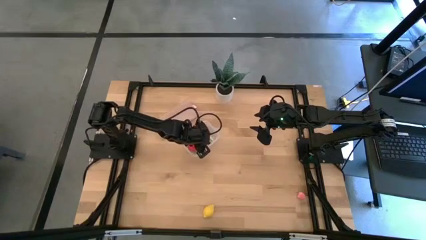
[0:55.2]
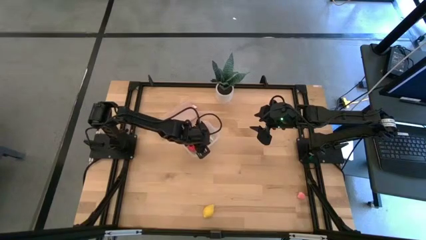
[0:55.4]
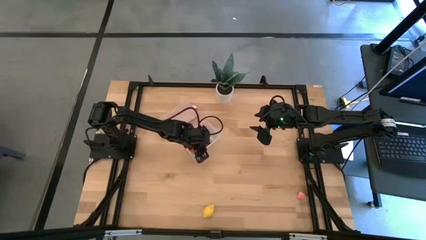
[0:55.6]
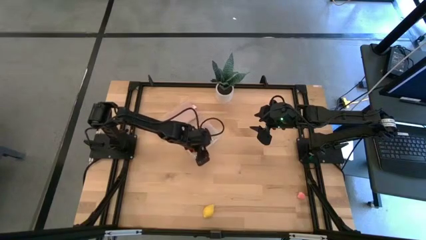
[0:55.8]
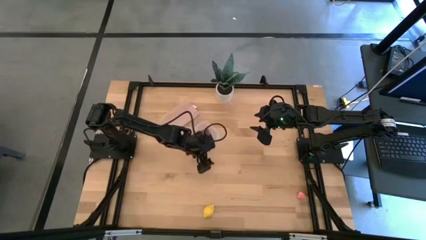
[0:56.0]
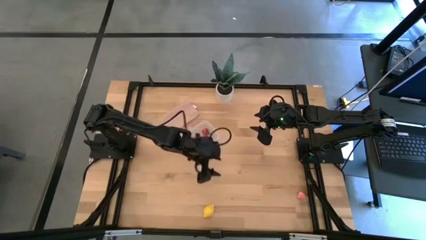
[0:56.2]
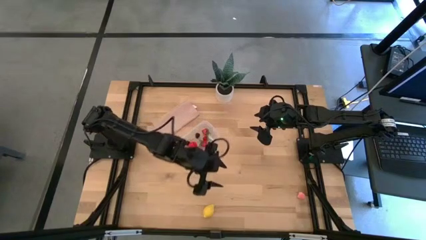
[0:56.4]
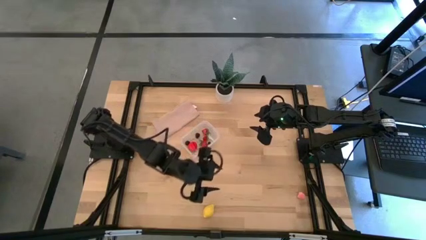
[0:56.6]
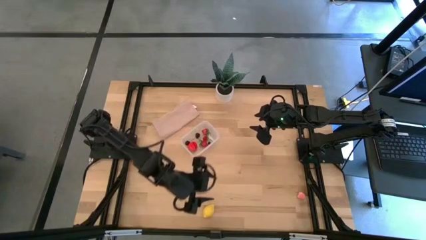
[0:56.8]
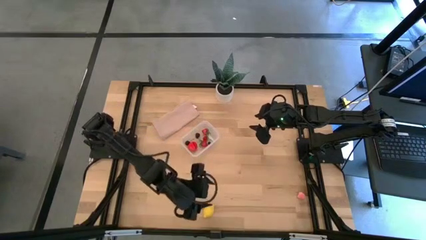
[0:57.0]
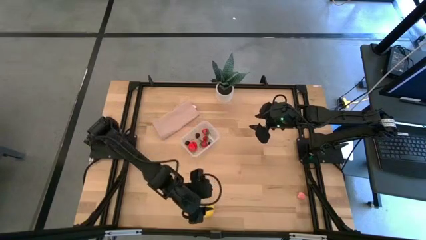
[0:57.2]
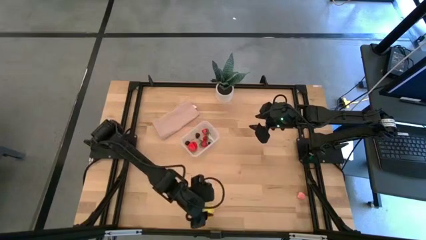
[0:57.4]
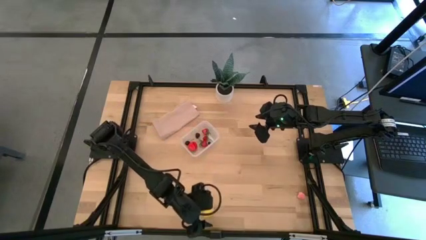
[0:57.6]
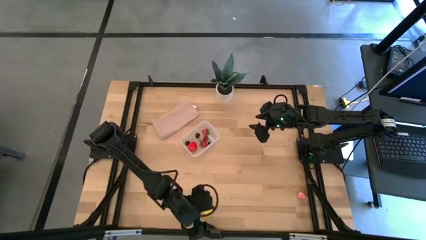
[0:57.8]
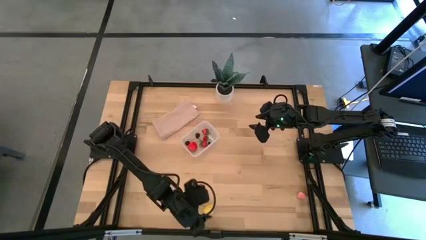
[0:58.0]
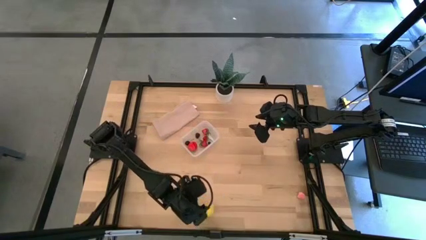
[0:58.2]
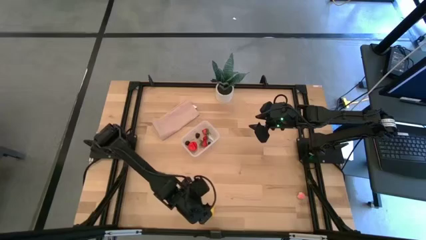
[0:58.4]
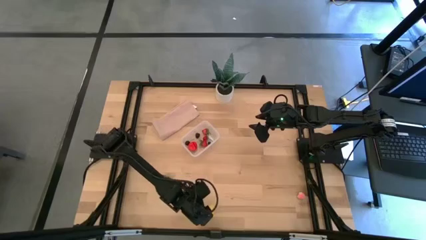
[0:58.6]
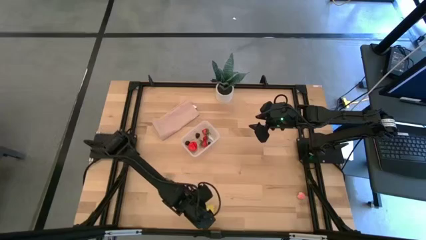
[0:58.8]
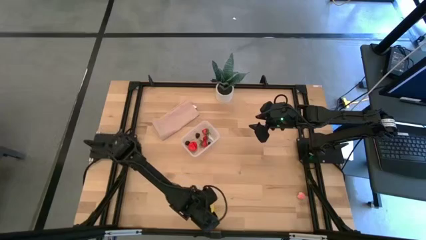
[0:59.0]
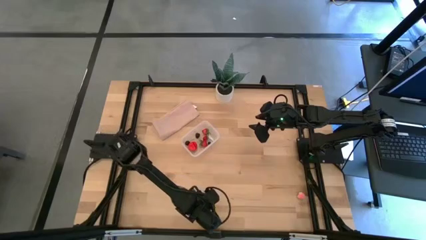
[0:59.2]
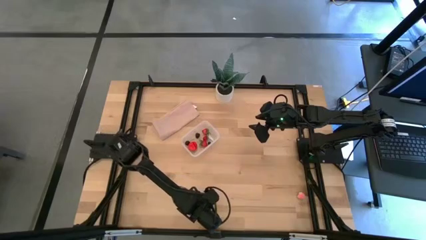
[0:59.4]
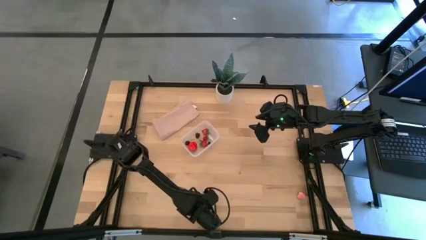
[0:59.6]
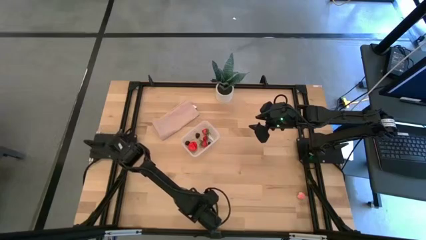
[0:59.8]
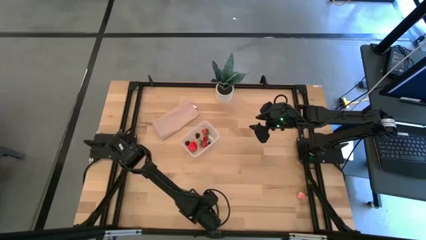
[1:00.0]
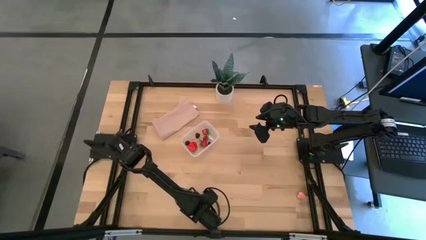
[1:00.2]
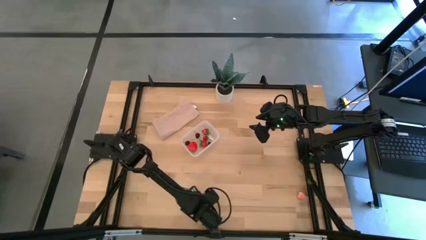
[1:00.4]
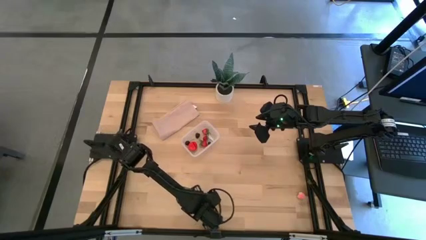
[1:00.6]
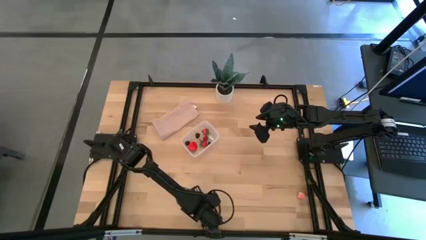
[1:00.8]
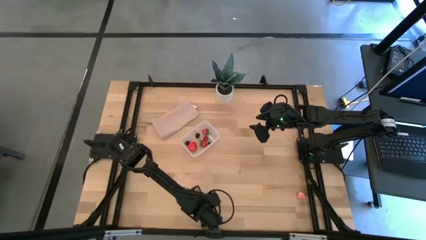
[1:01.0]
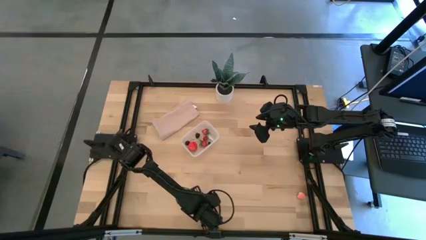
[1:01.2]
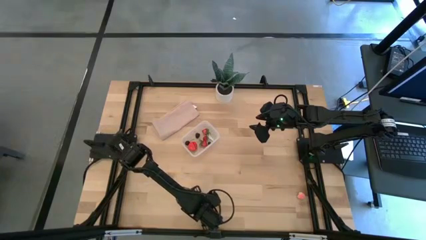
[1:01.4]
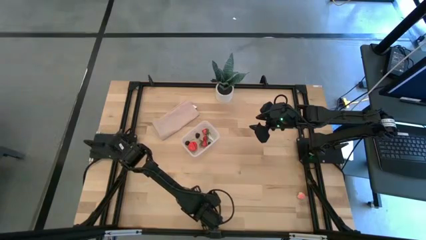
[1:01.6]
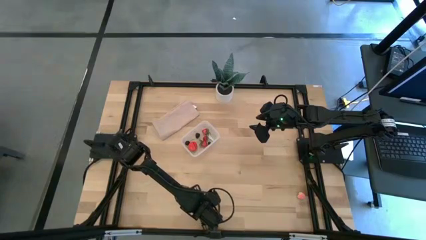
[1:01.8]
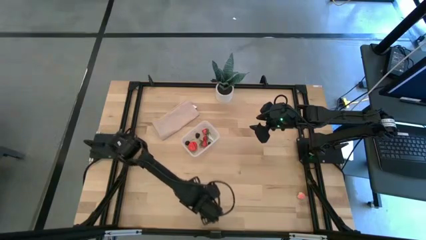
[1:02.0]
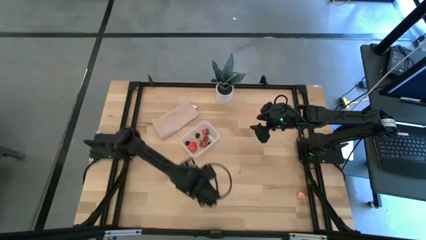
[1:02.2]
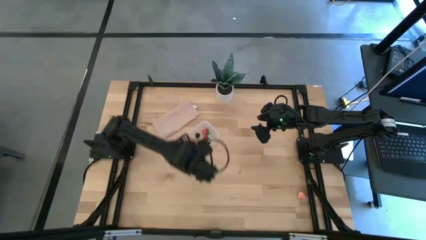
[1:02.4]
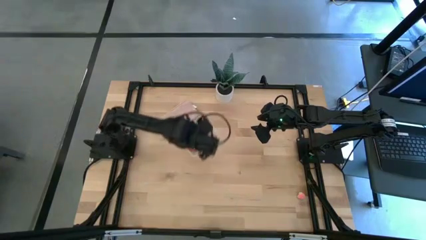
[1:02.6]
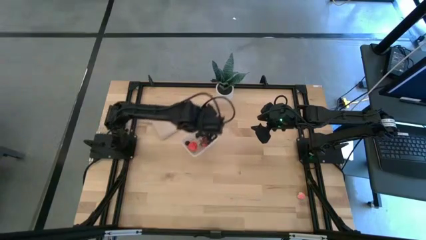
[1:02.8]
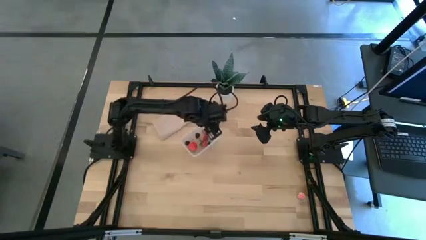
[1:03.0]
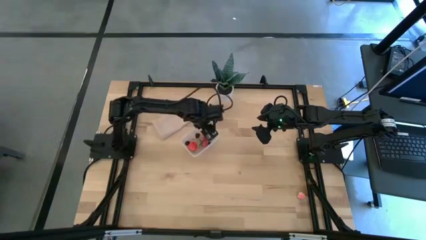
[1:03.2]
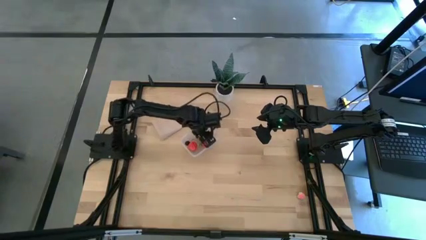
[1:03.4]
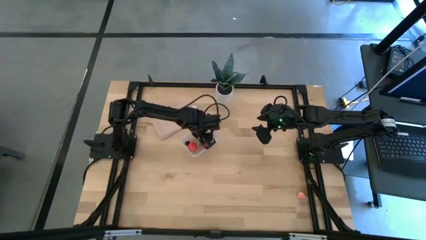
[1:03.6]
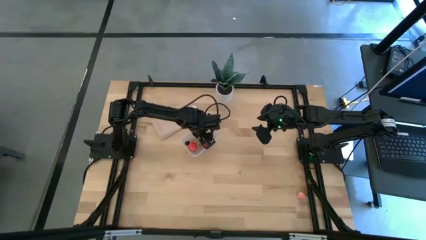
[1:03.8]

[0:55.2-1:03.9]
Task: Pick and placing Produce into tupperware
Put the yellow lemon into the transparent bin

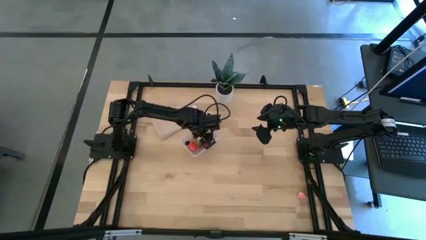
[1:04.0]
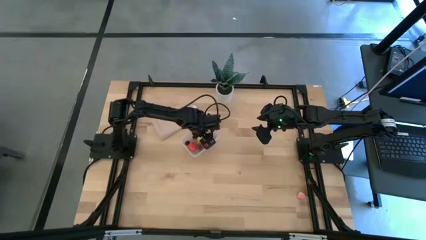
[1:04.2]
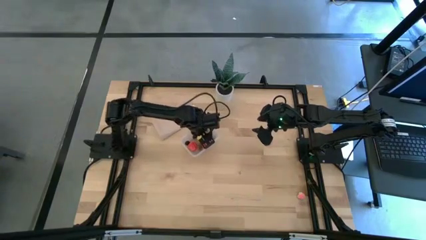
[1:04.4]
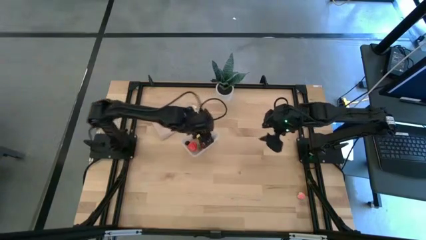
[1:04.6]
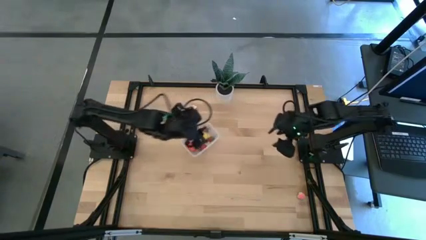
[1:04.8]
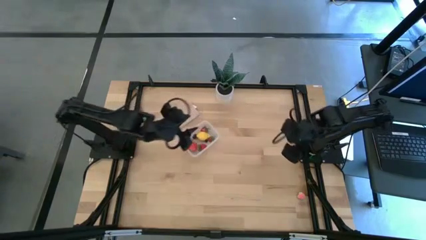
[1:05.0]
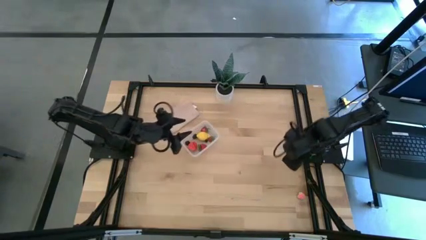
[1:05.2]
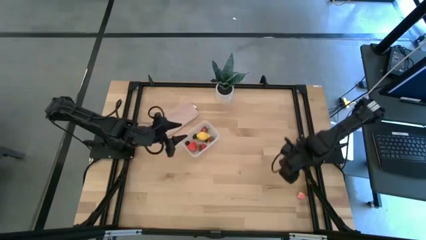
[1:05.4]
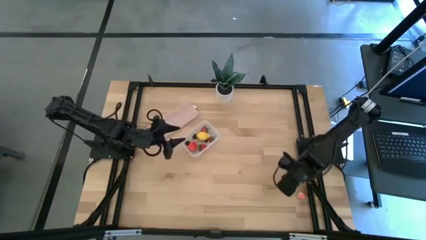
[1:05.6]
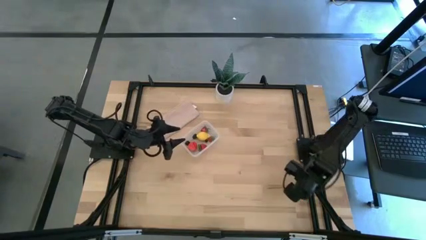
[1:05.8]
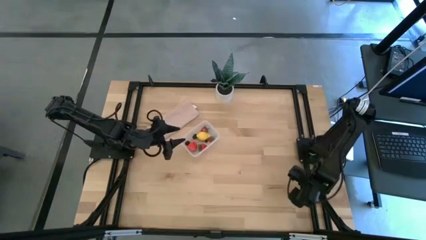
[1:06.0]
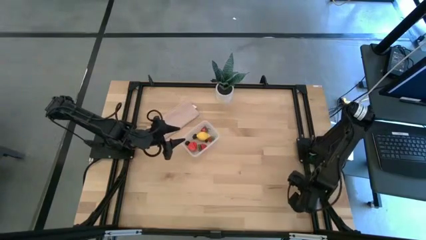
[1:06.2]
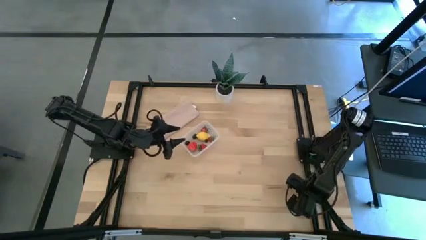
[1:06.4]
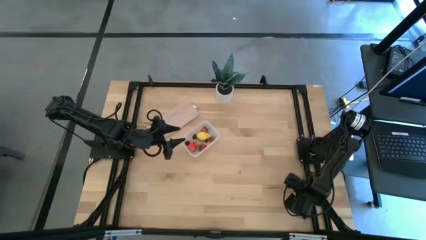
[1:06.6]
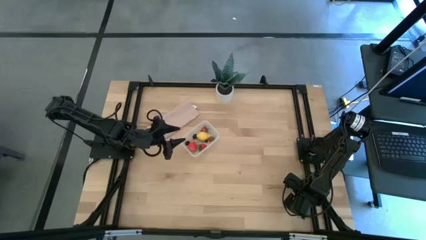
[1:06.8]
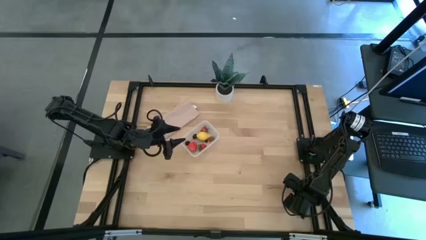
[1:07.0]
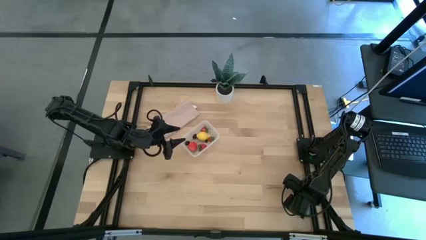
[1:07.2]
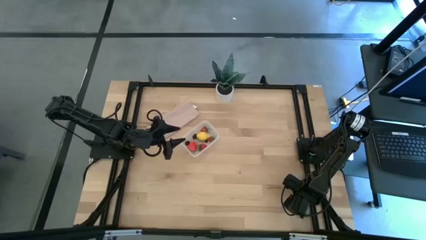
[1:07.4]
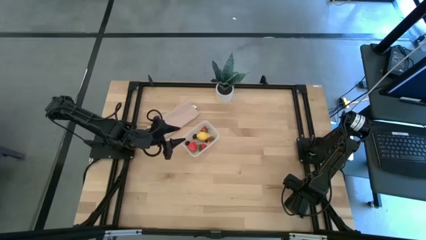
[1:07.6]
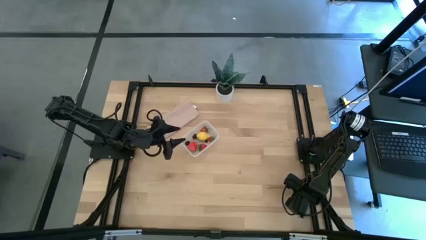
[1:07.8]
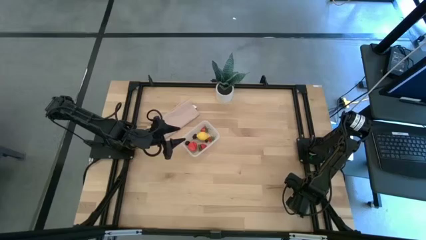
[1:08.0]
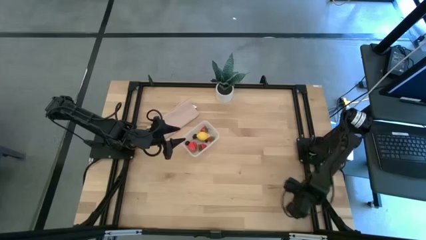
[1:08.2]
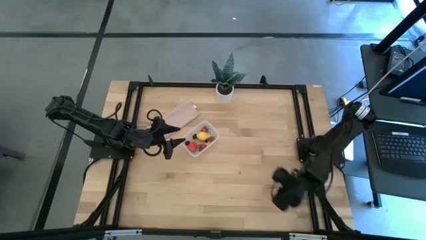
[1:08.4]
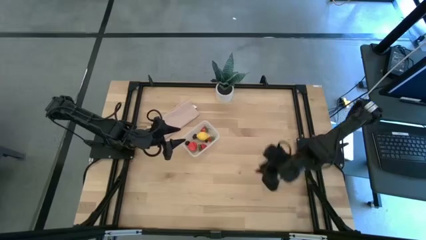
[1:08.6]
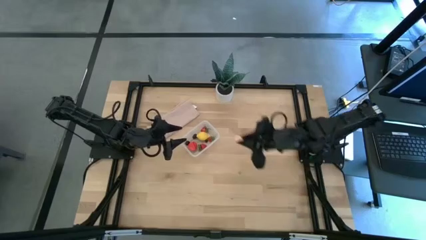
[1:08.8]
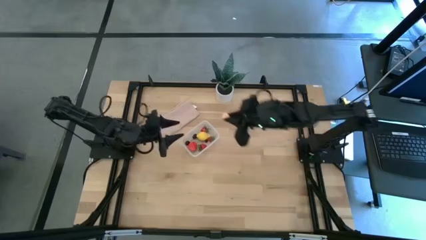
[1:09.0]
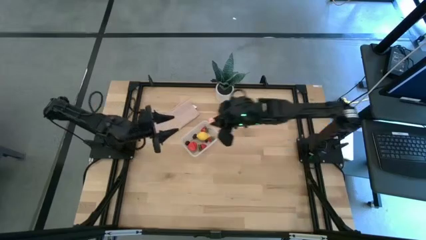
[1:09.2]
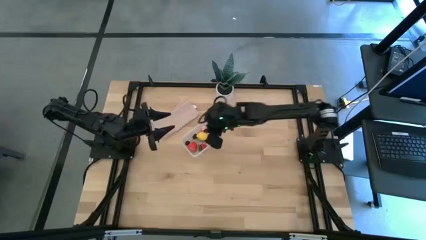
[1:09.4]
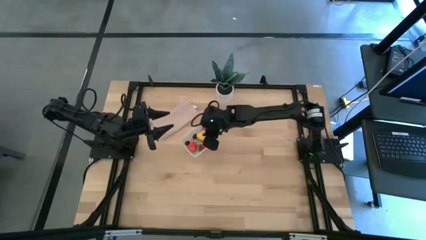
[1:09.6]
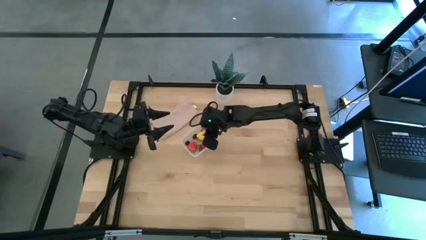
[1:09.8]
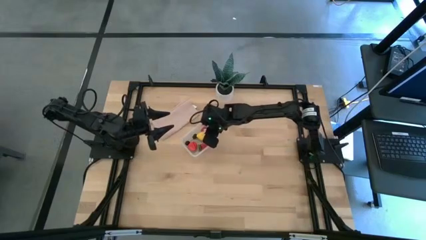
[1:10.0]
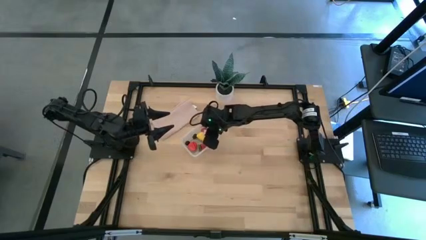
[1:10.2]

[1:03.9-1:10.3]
Put the pink peach into the transparent bin

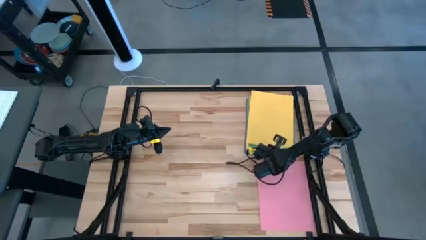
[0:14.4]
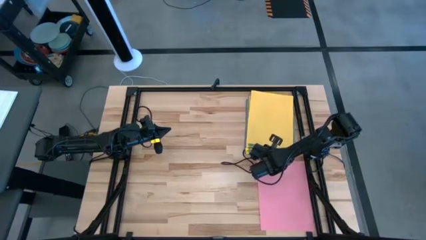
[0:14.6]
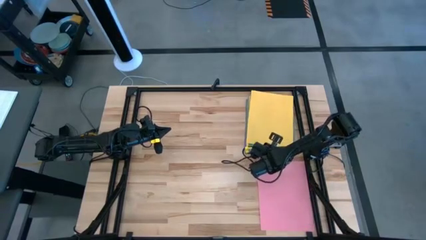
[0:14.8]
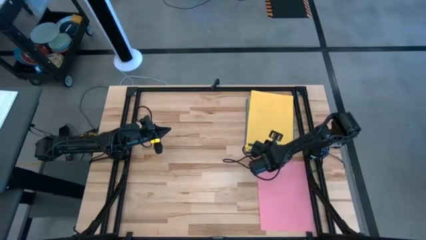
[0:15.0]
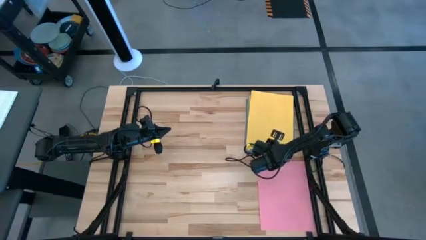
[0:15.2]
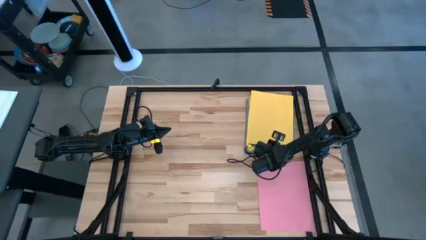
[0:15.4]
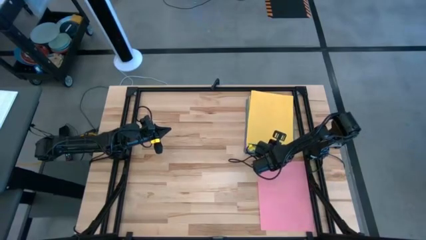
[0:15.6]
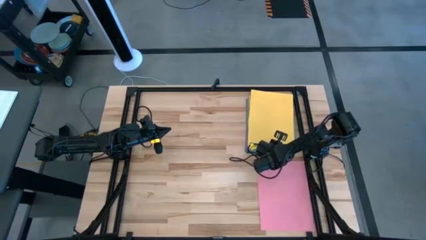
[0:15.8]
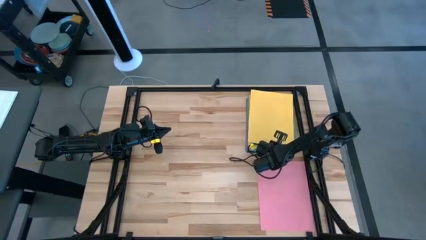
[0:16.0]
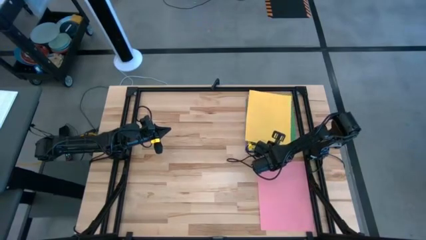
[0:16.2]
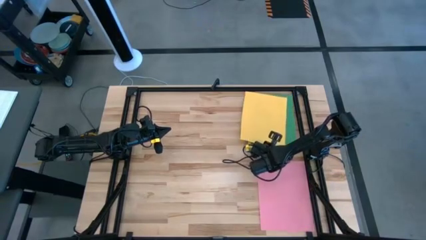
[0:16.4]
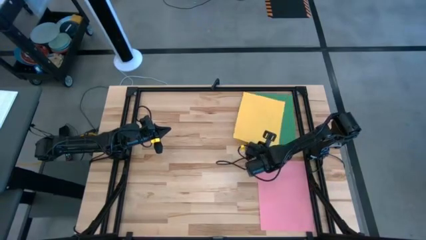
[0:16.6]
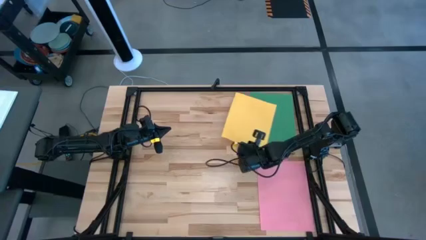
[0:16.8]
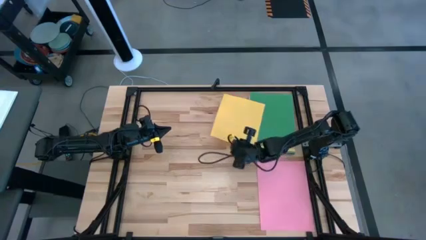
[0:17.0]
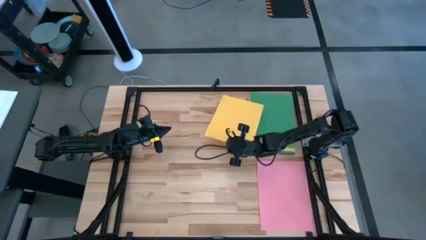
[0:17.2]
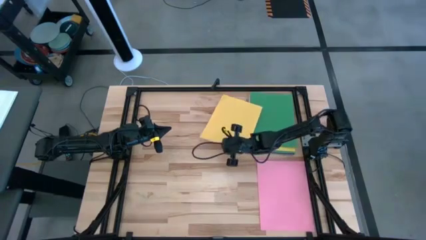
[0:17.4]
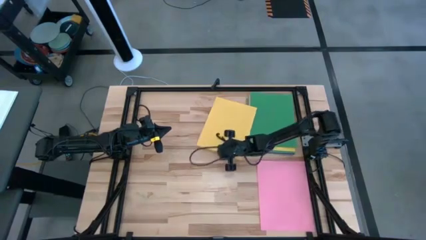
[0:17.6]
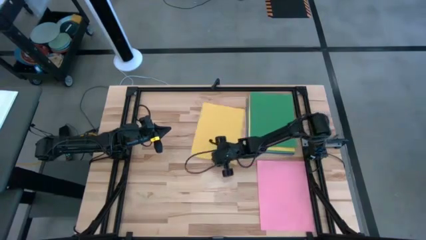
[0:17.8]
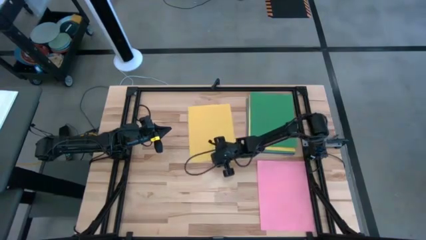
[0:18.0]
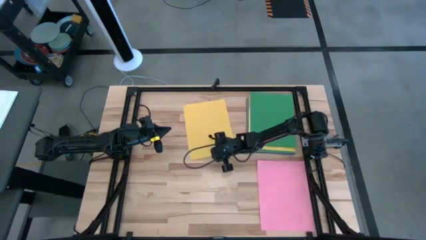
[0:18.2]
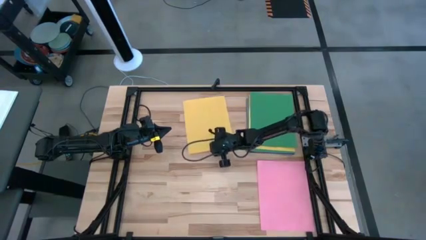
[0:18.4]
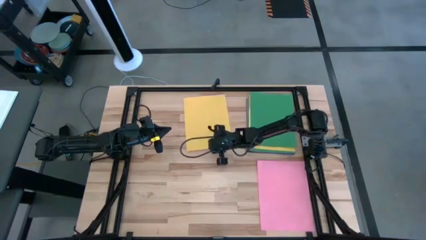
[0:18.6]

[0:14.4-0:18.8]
Task: Organize paper
Move the yellow paper to the top center of the table
